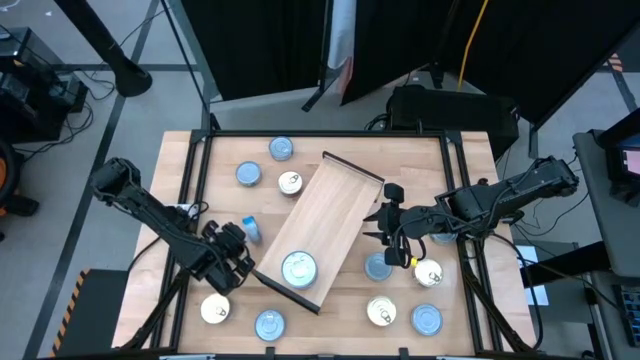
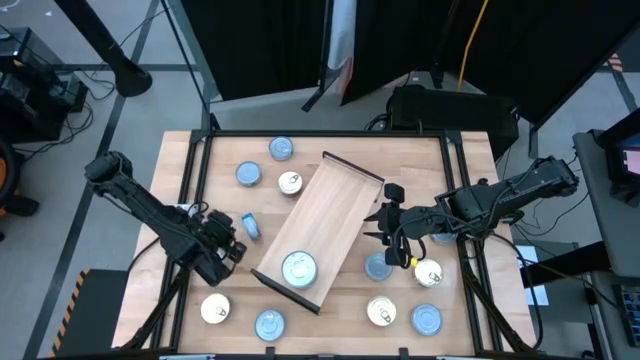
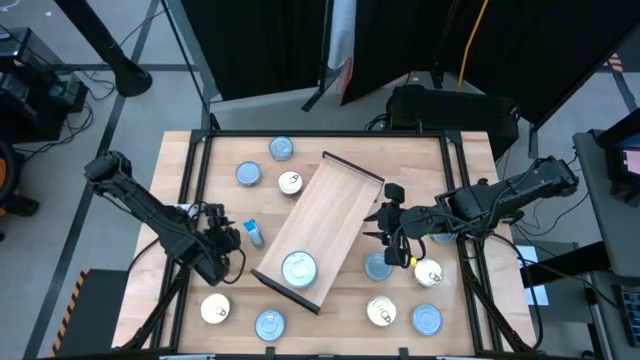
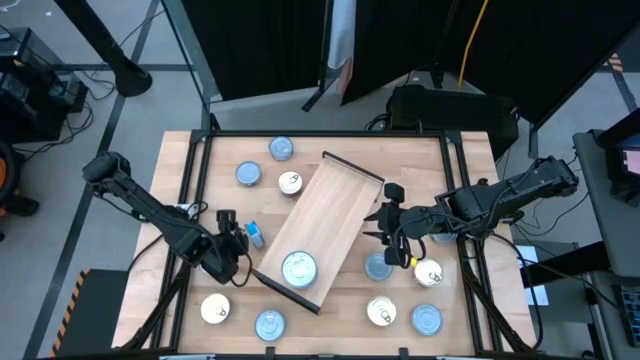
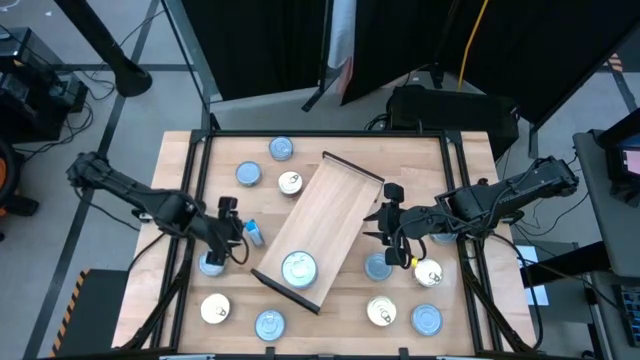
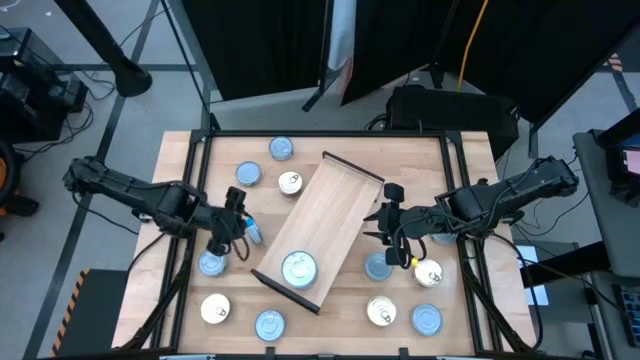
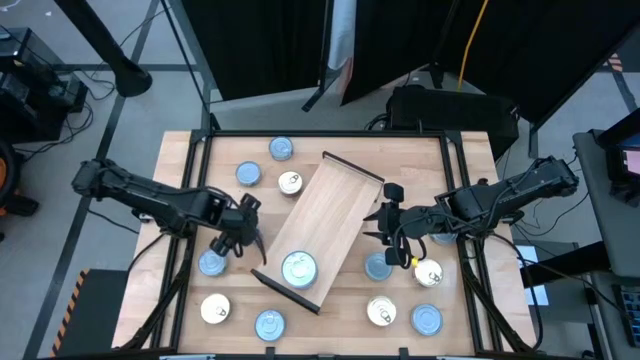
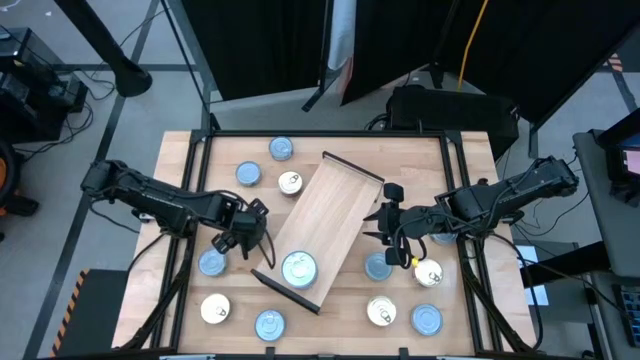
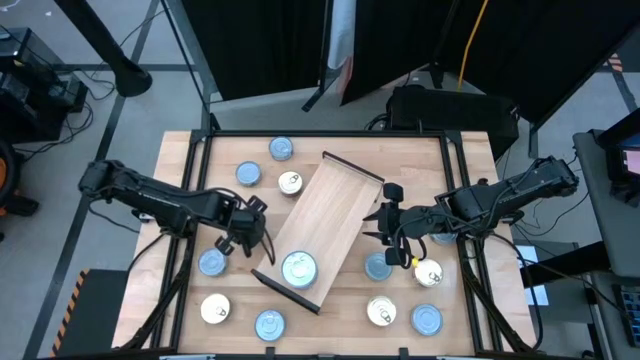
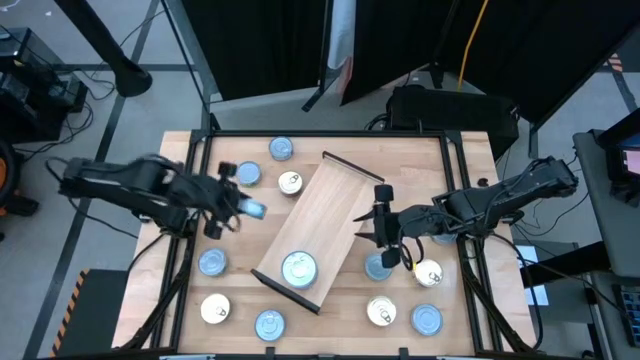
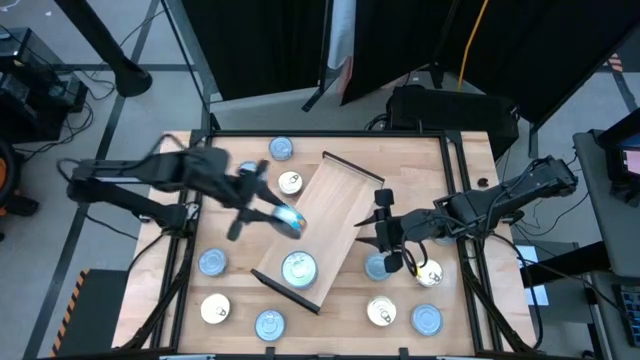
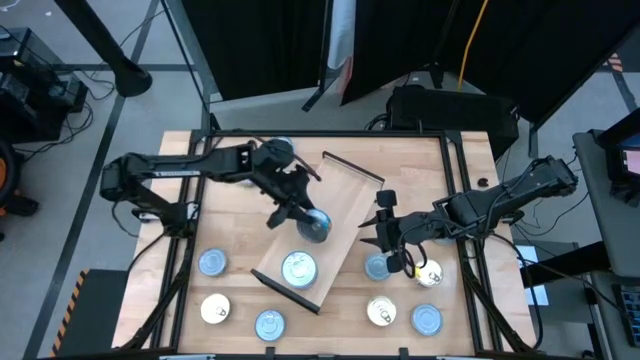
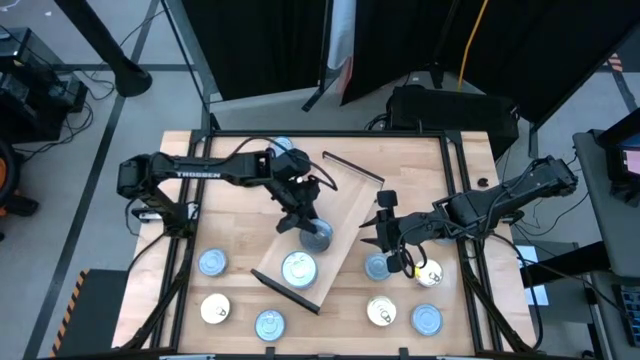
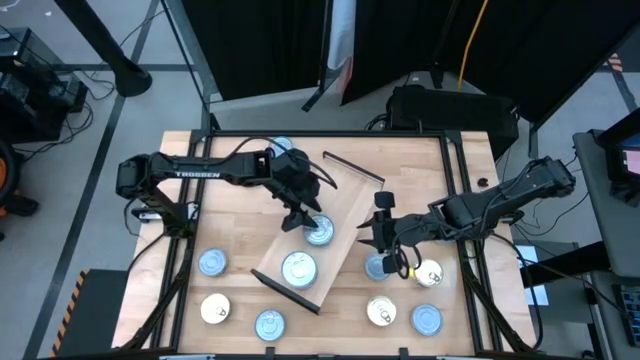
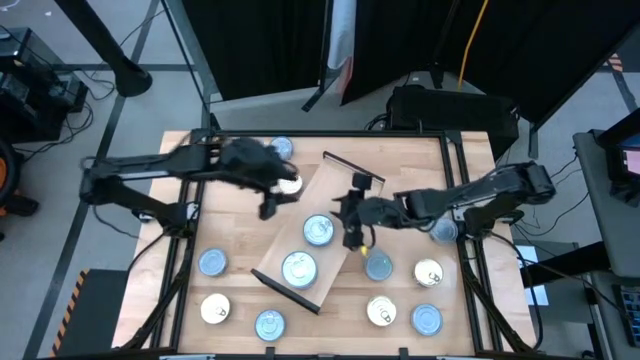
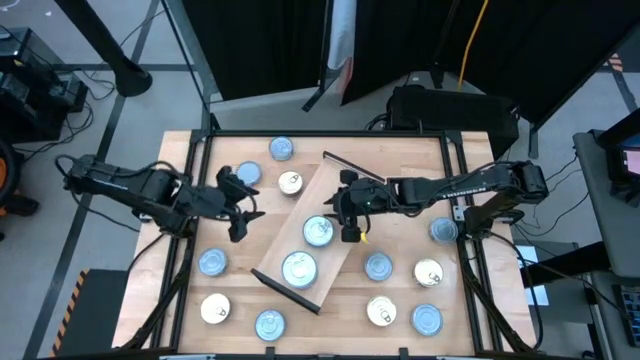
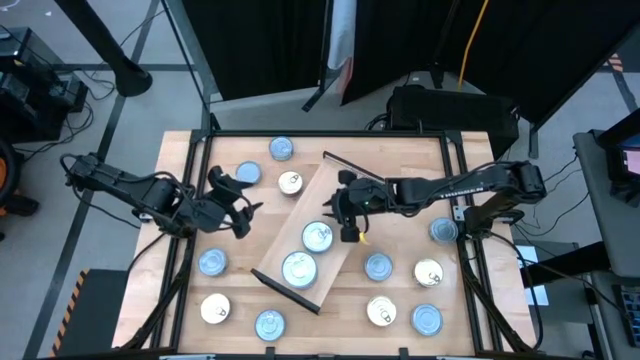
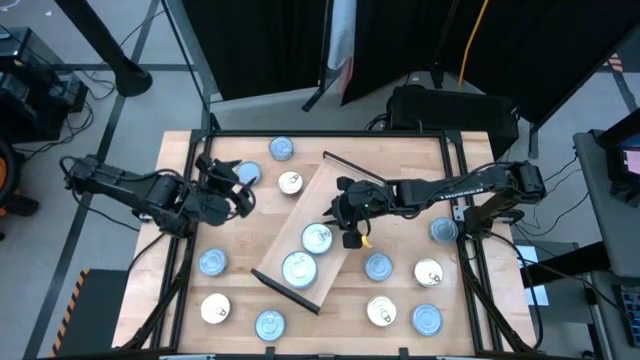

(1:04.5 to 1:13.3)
Task: Stack canned seafood by type on shelf
Put the light blue tuna can on the shelf

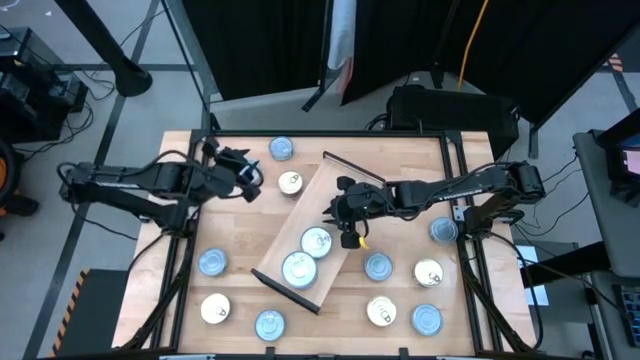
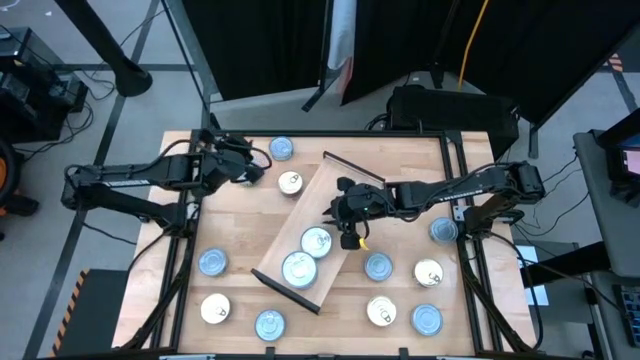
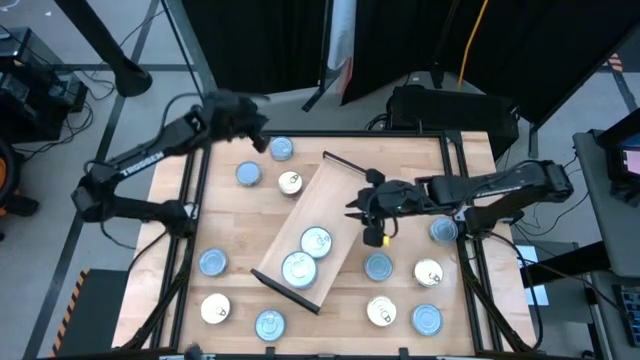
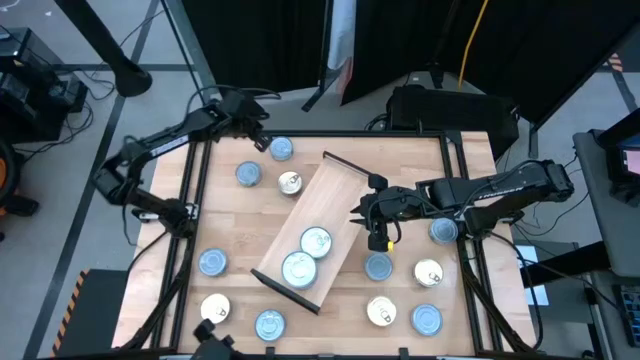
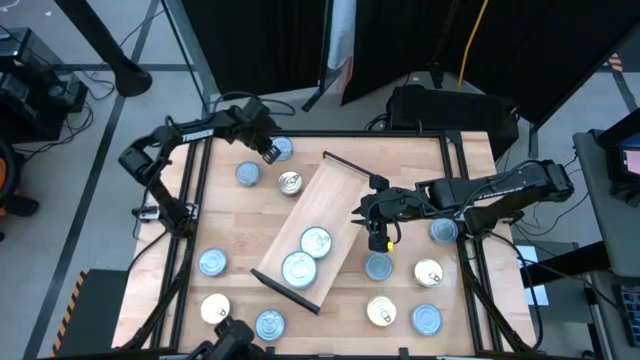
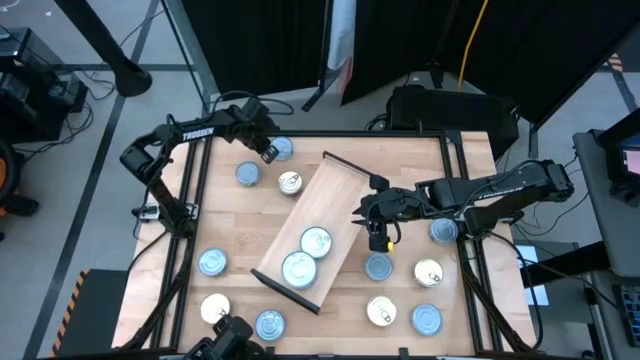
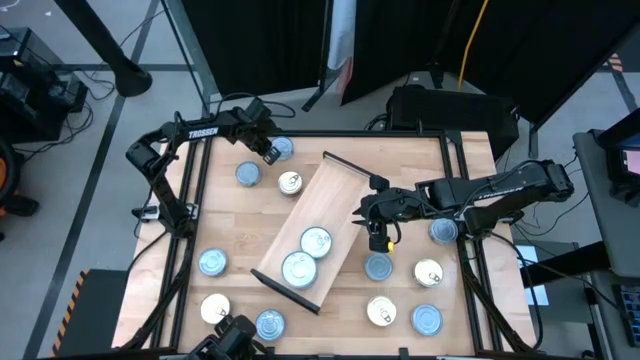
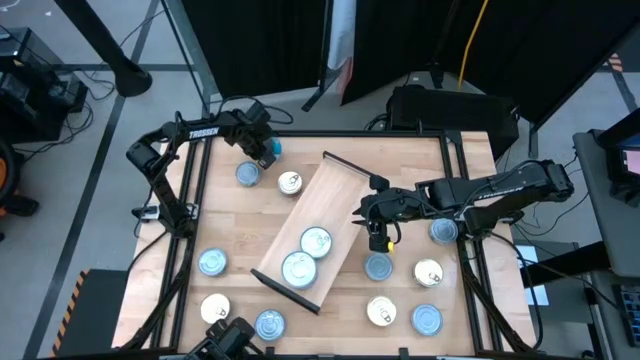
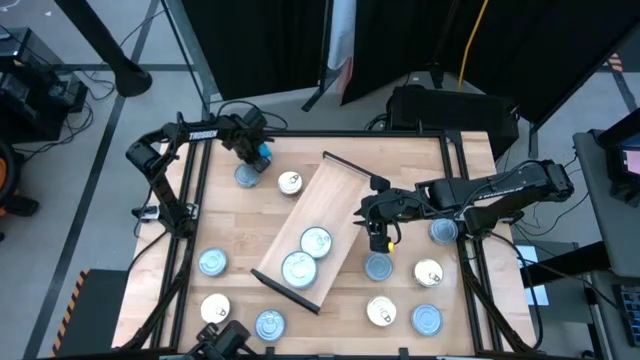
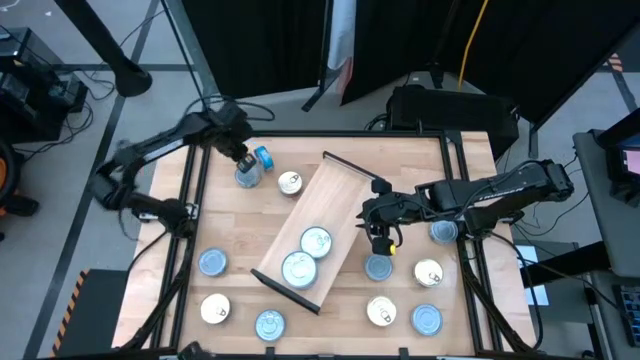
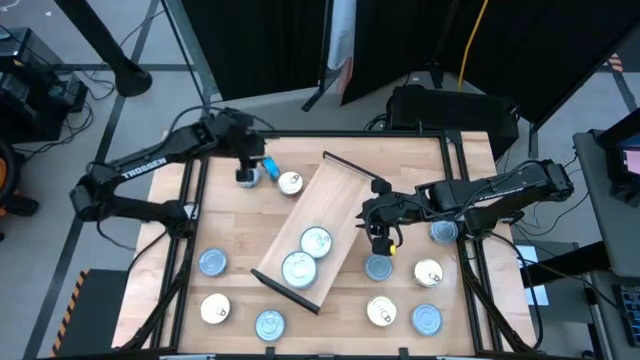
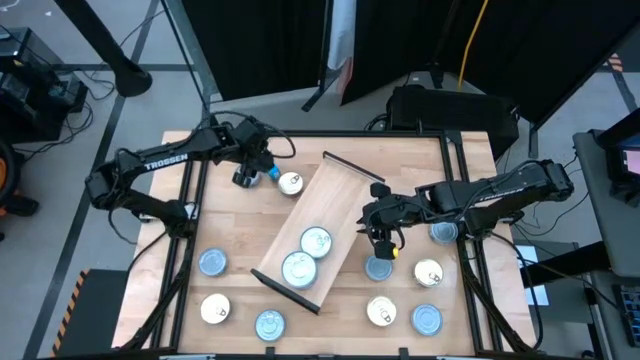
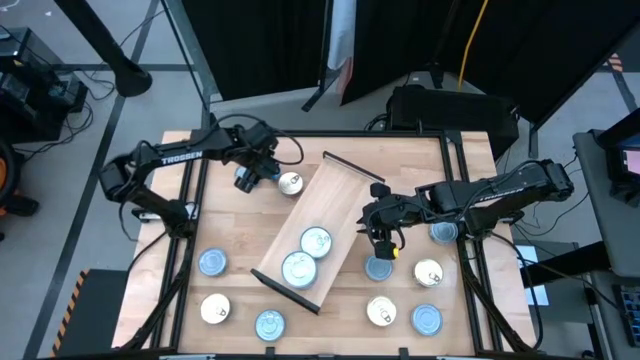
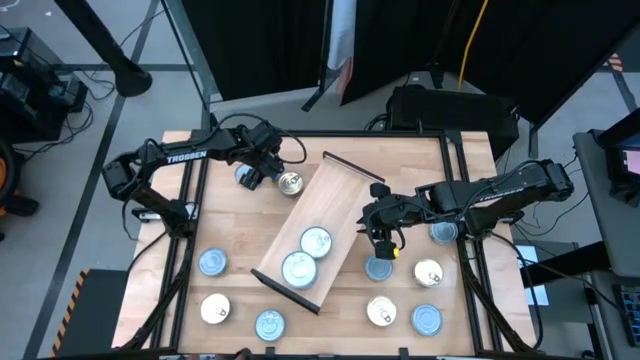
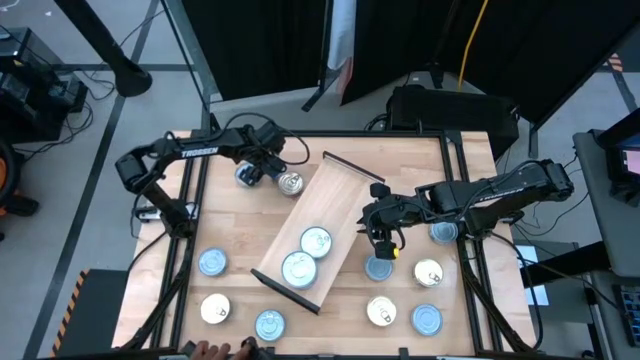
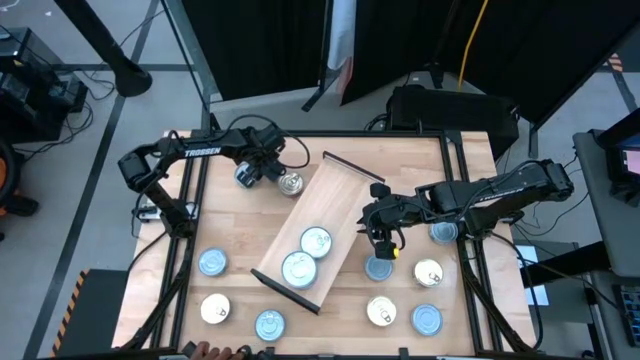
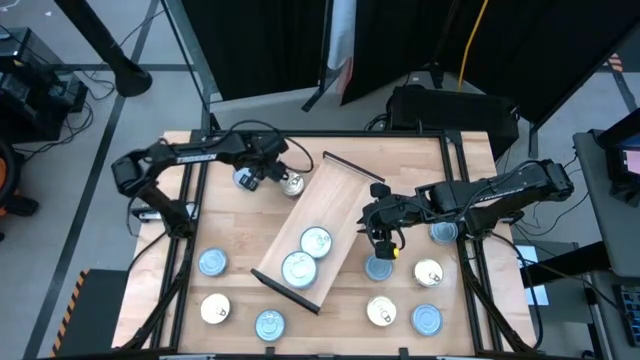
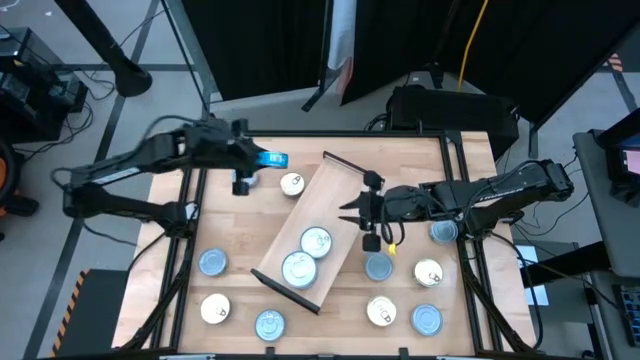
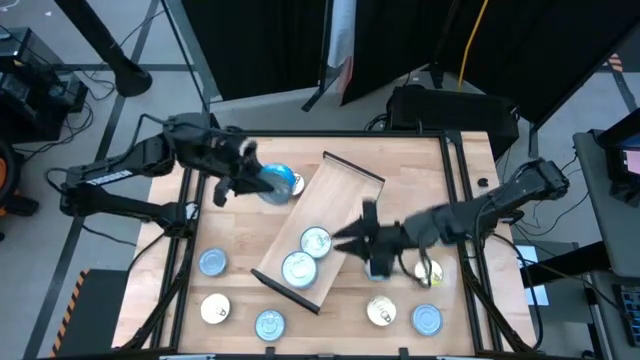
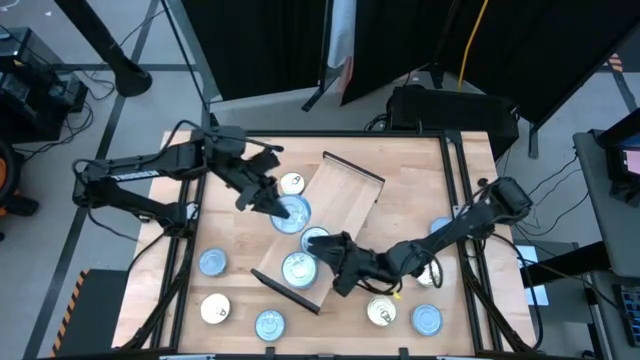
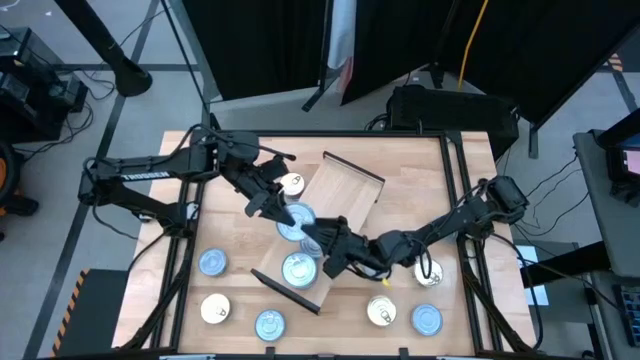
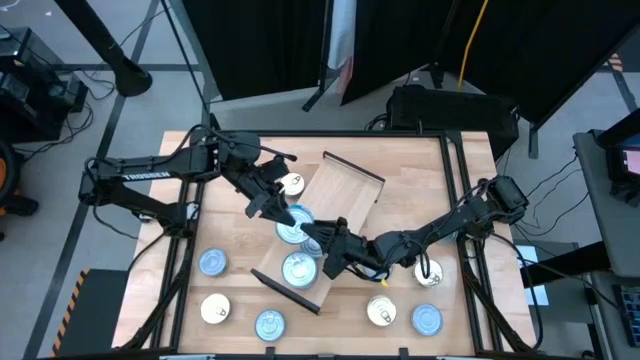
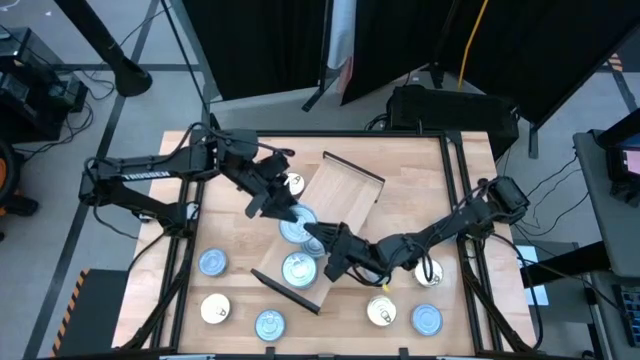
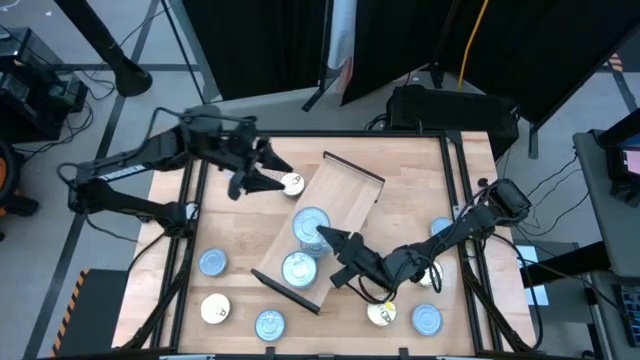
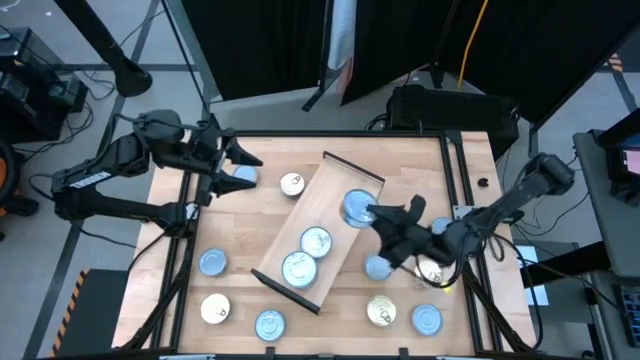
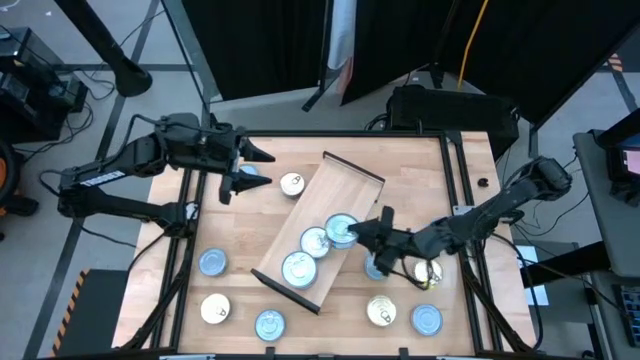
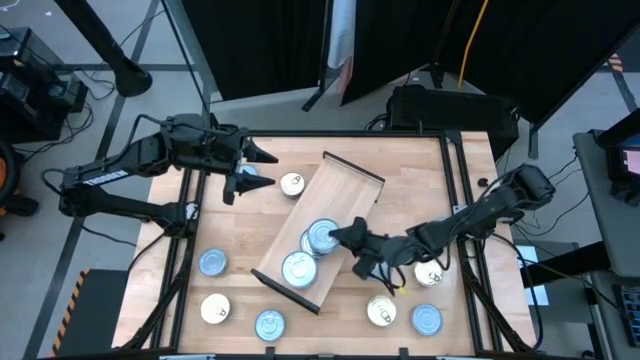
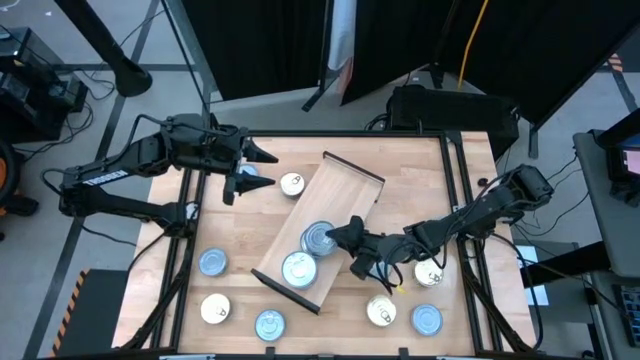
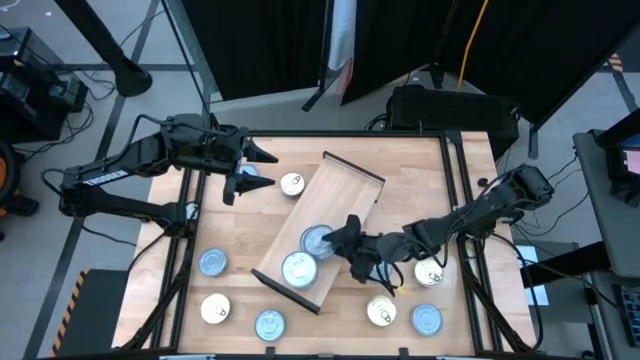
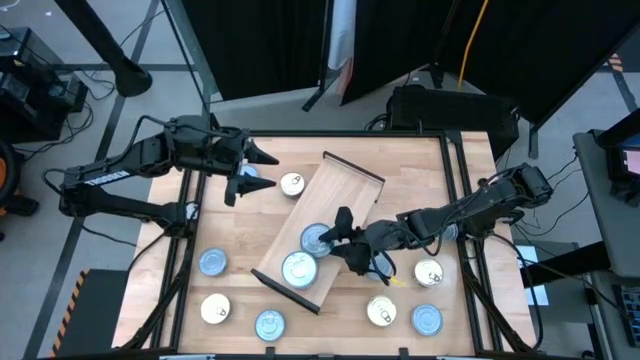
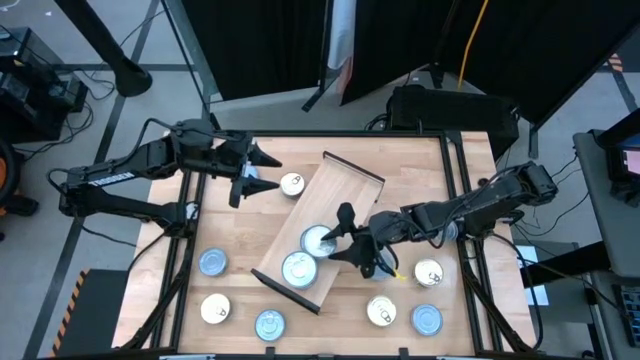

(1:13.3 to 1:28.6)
Stack the light blue tuna can on top of the other light blue tuna can
